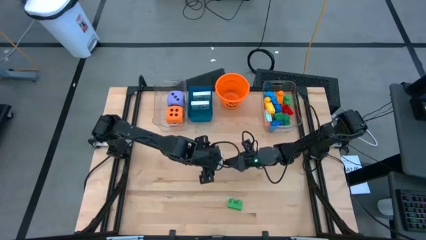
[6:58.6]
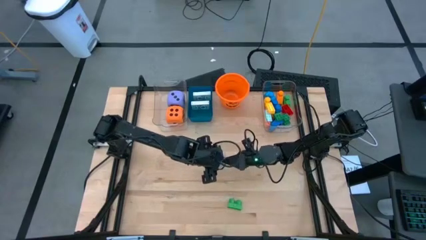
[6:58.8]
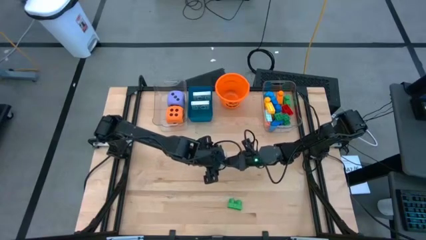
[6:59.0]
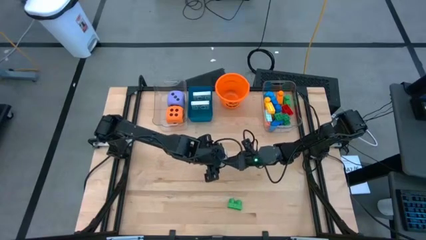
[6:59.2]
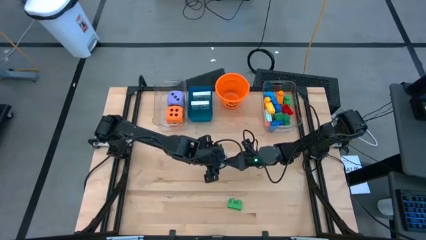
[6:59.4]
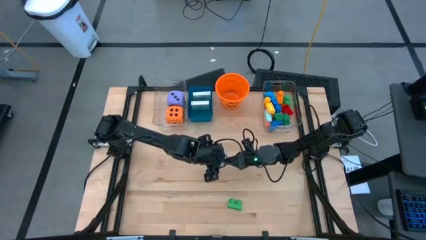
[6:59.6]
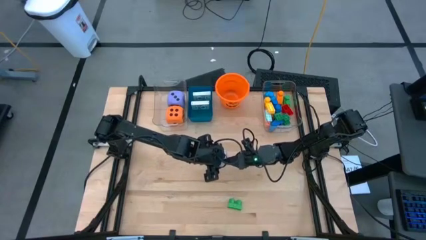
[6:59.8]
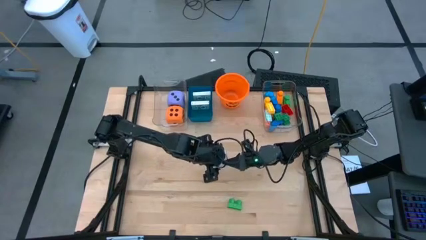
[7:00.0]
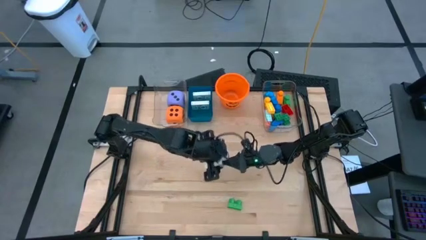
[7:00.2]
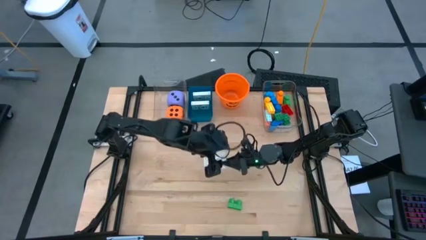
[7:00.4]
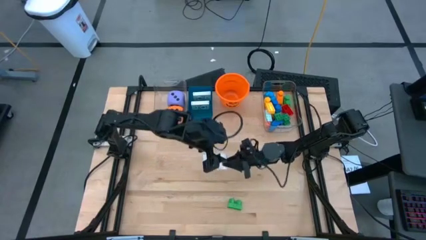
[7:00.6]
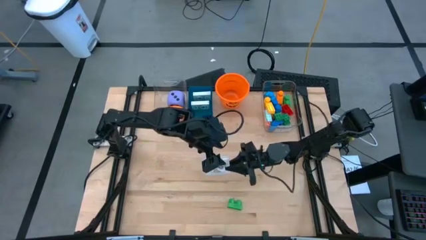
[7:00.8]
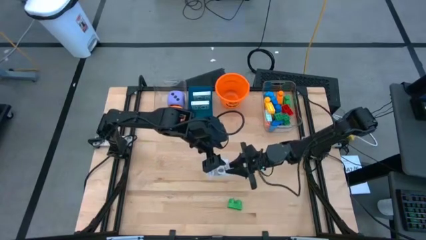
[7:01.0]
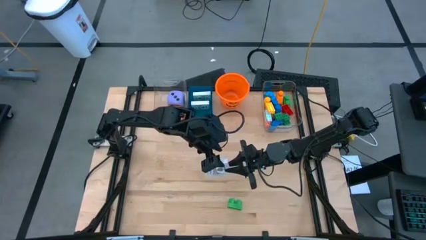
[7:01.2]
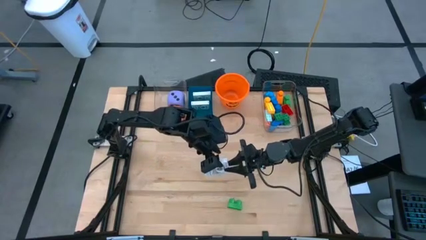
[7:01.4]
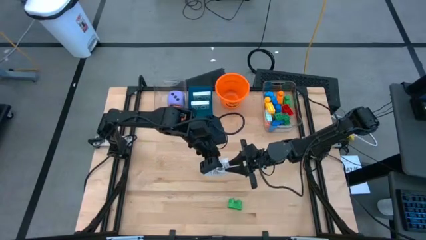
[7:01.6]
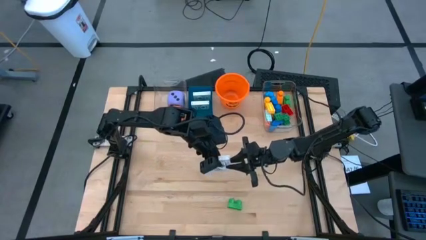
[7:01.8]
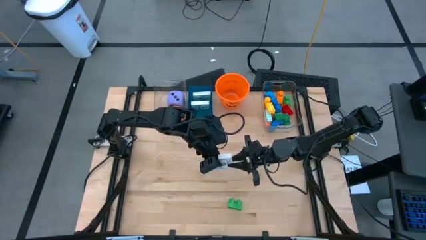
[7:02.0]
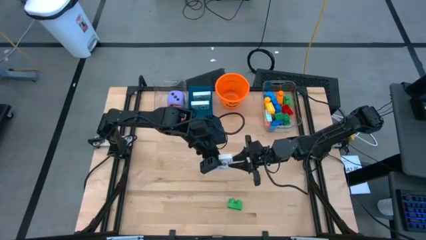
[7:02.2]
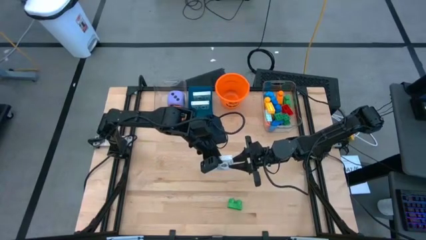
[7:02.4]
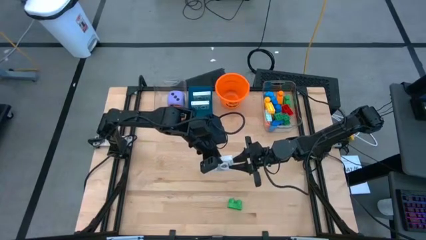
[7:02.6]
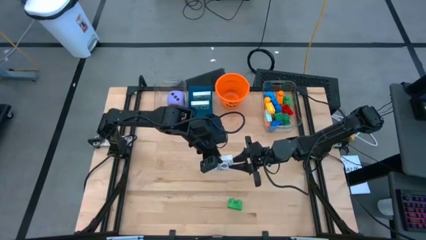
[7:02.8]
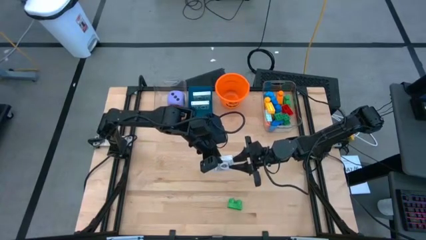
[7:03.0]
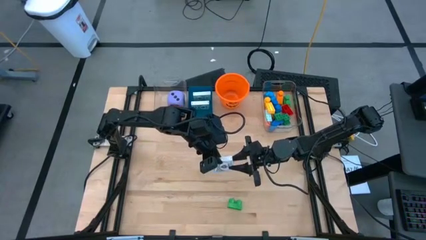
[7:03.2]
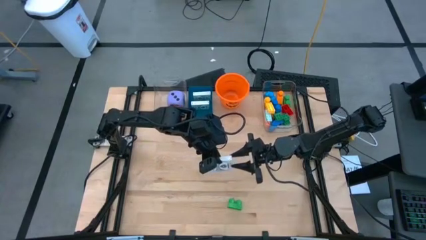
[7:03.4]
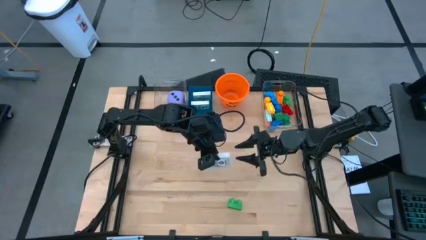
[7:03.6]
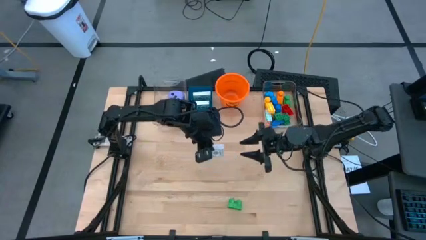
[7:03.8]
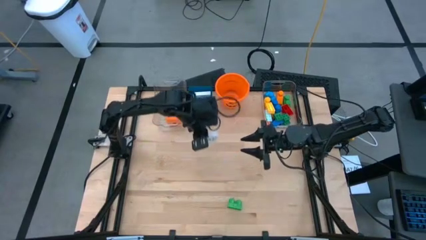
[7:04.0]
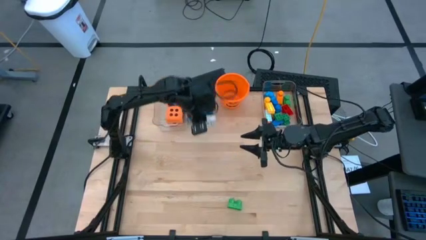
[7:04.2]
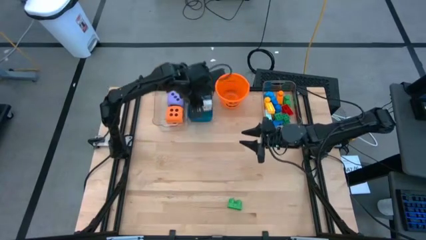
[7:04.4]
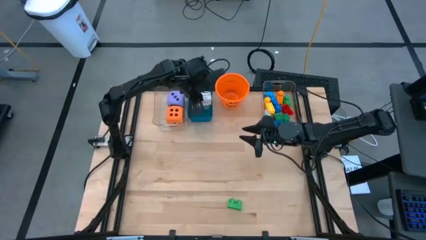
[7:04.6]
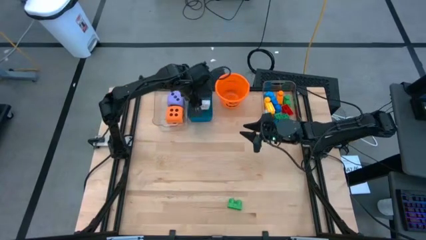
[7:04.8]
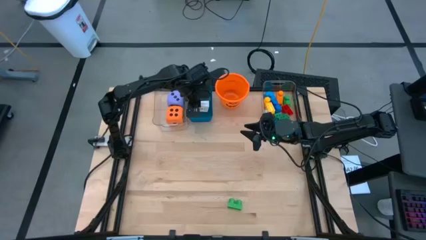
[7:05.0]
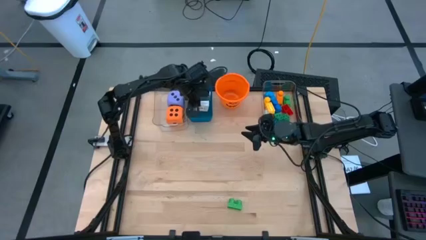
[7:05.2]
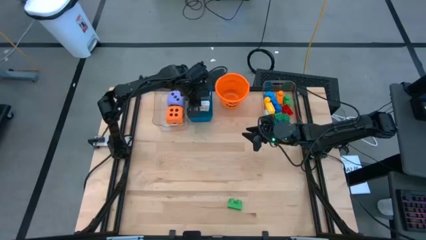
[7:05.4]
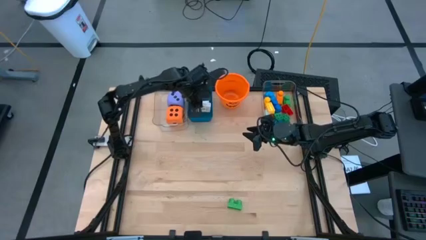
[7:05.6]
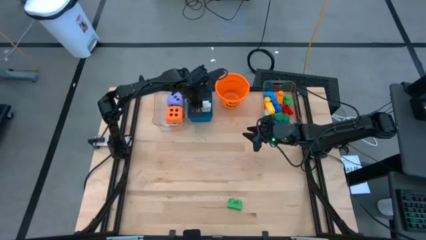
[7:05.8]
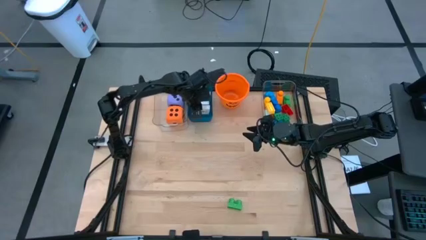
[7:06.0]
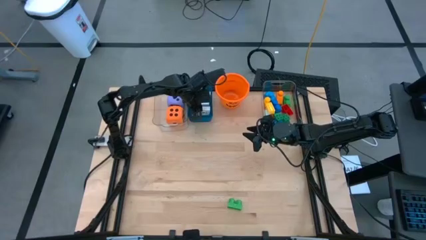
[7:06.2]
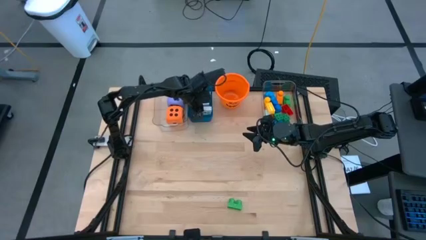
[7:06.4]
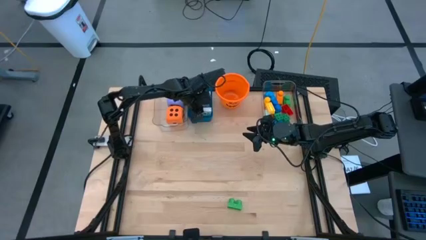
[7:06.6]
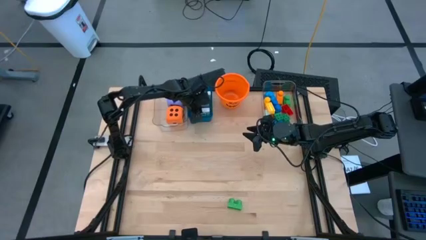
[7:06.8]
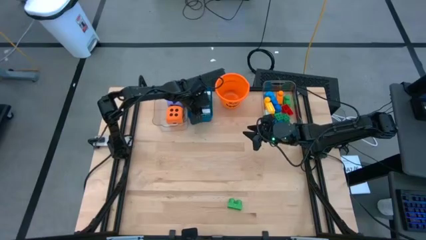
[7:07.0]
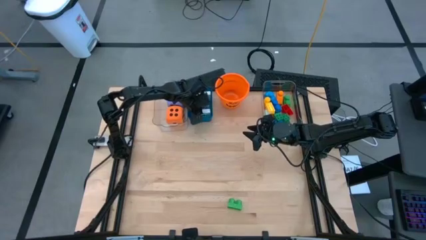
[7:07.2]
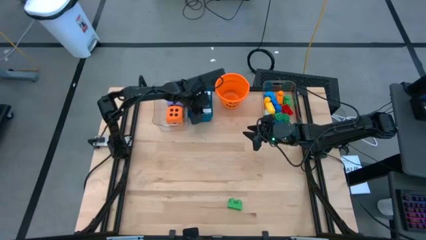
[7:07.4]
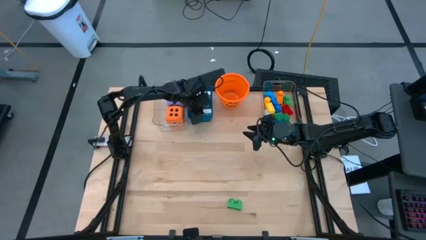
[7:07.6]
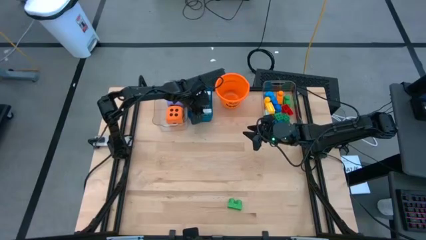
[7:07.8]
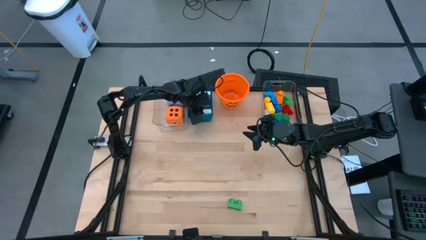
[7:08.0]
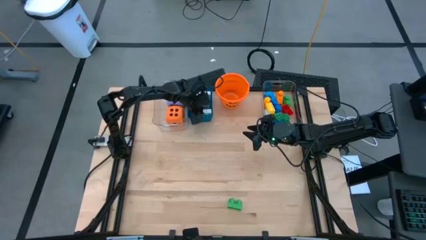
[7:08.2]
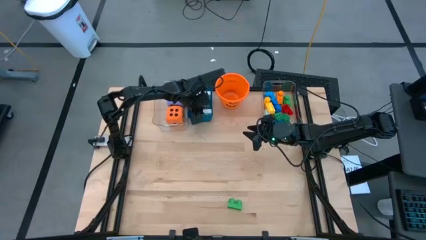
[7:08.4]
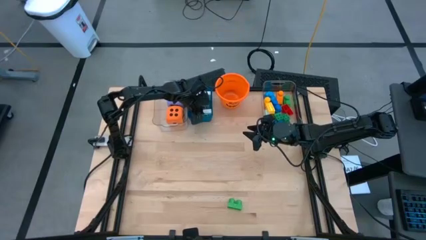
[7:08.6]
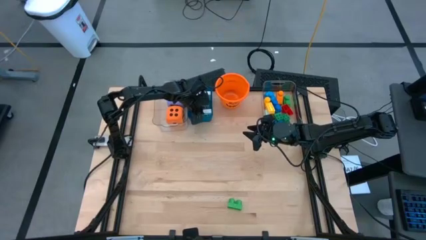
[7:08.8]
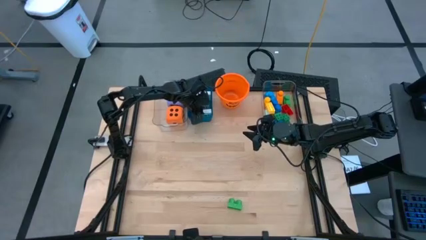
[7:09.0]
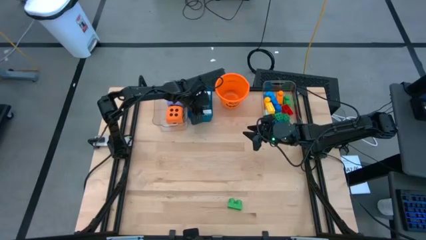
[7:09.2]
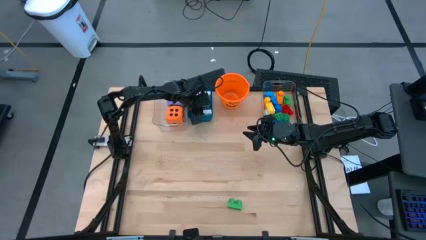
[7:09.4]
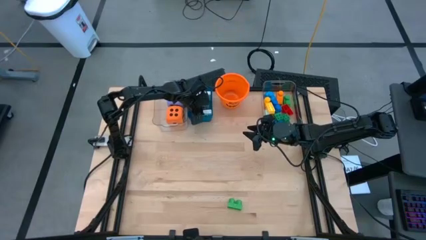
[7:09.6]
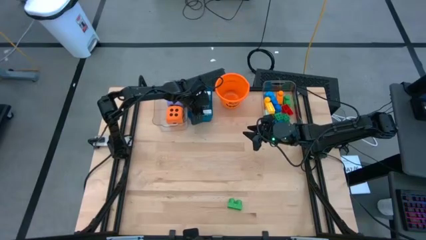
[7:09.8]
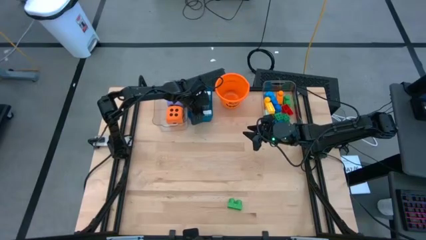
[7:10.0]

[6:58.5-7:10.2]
Task: Pick & Place Toys
Put the gold deck of cards into the blue bin
